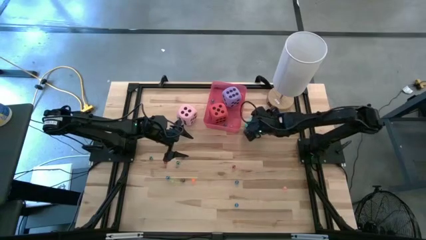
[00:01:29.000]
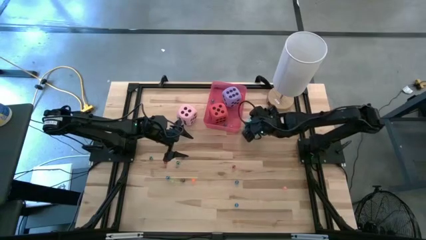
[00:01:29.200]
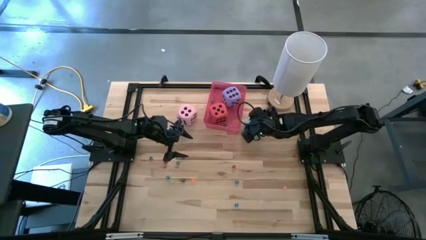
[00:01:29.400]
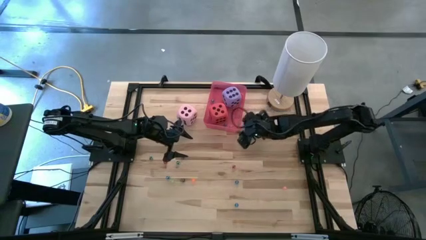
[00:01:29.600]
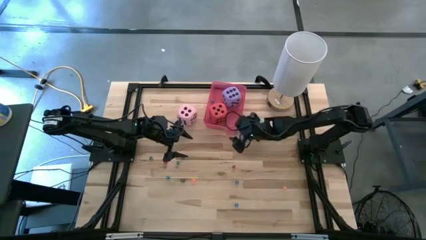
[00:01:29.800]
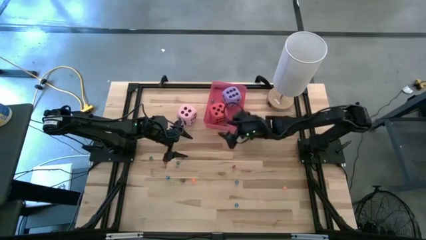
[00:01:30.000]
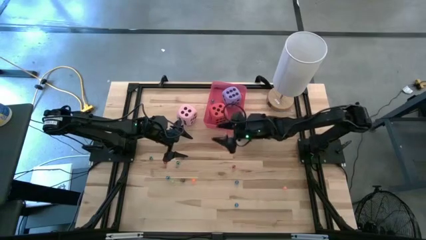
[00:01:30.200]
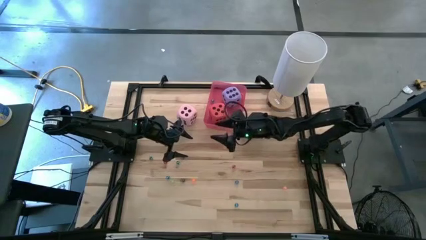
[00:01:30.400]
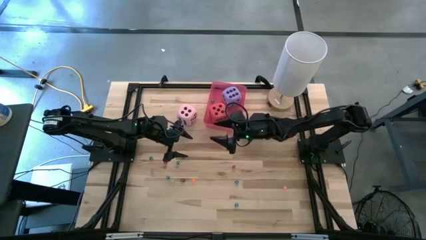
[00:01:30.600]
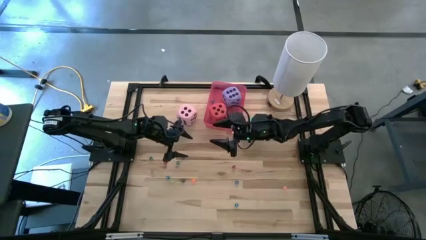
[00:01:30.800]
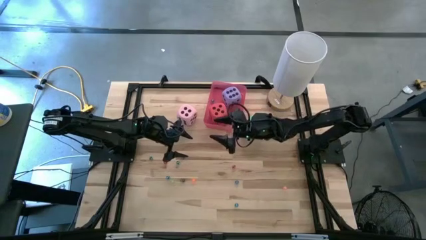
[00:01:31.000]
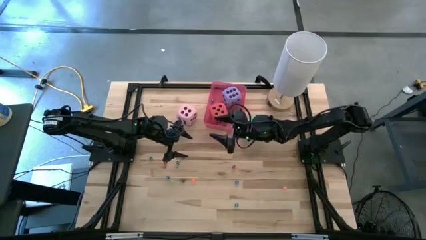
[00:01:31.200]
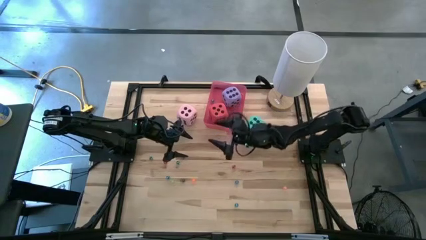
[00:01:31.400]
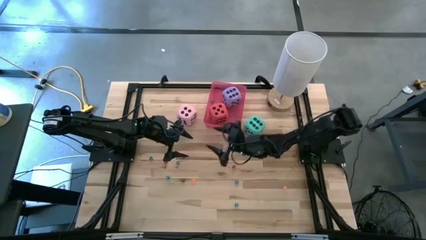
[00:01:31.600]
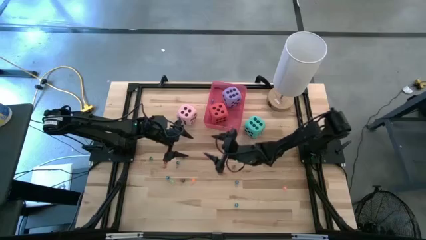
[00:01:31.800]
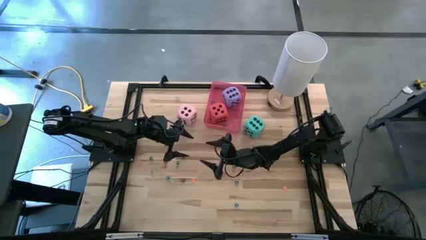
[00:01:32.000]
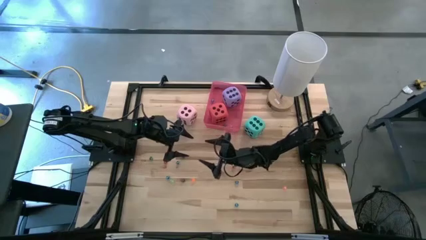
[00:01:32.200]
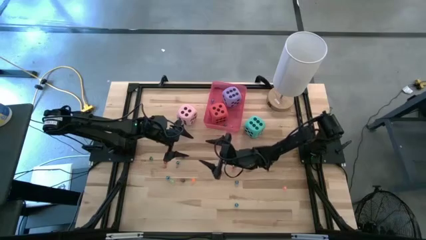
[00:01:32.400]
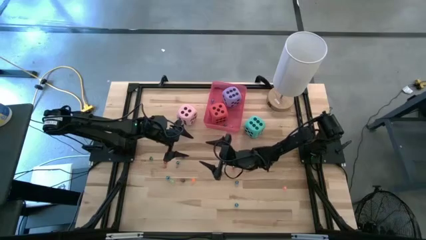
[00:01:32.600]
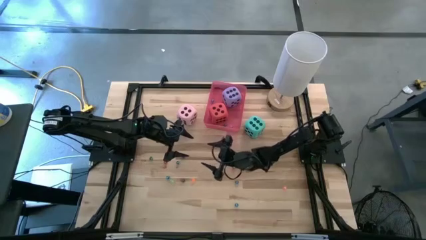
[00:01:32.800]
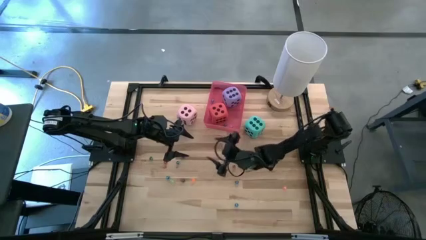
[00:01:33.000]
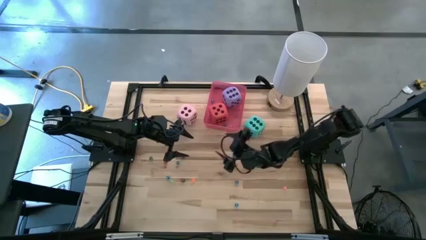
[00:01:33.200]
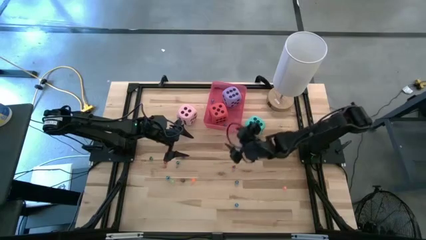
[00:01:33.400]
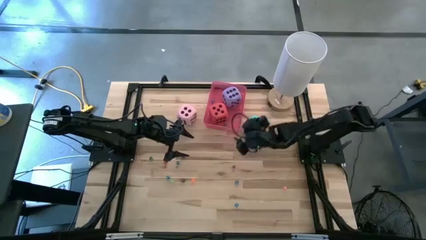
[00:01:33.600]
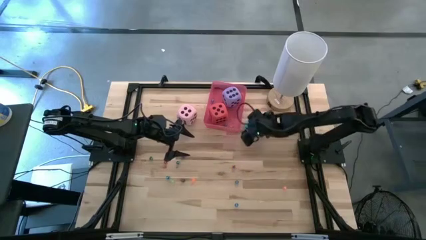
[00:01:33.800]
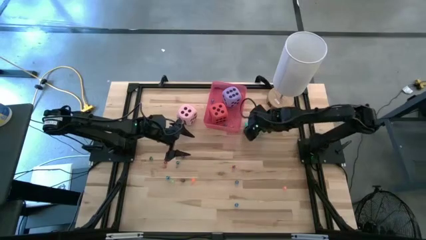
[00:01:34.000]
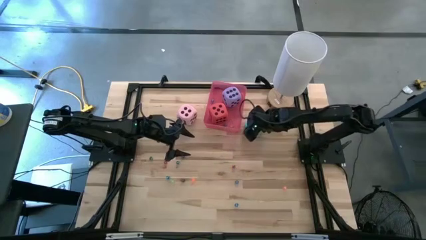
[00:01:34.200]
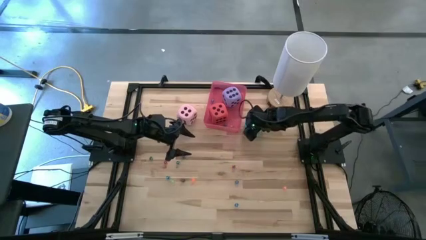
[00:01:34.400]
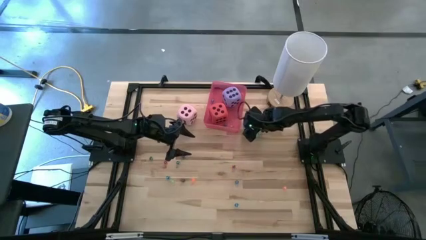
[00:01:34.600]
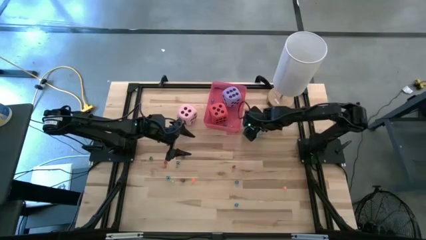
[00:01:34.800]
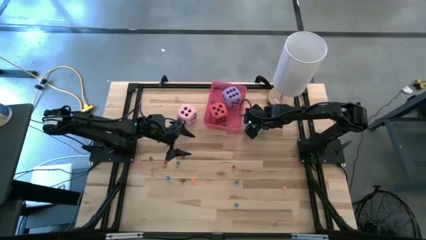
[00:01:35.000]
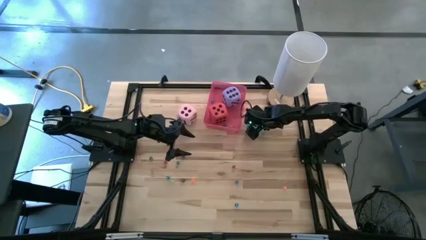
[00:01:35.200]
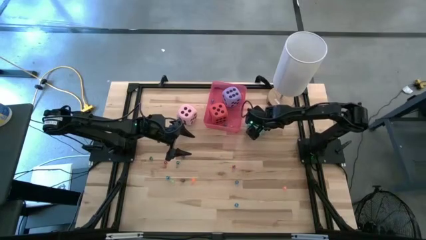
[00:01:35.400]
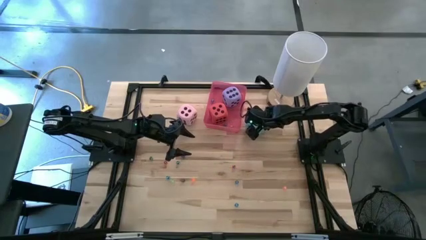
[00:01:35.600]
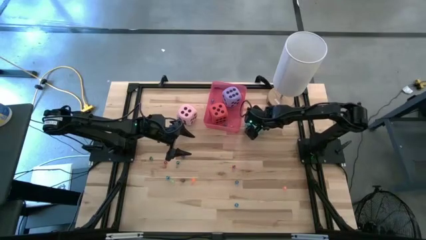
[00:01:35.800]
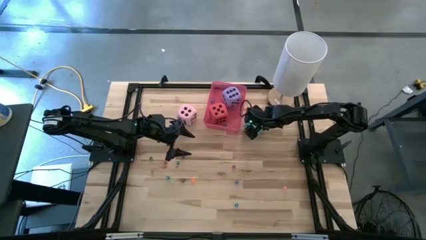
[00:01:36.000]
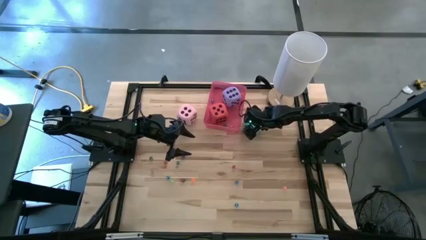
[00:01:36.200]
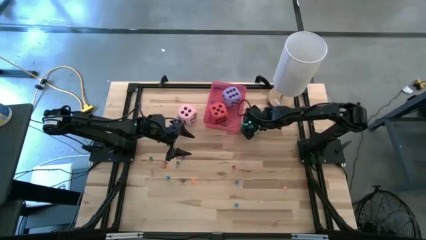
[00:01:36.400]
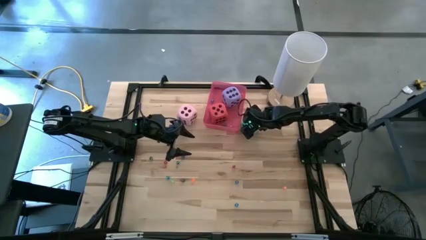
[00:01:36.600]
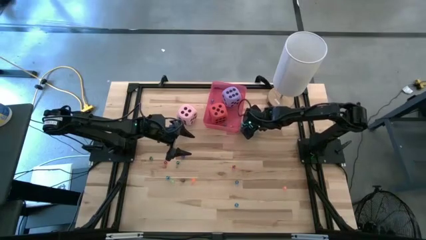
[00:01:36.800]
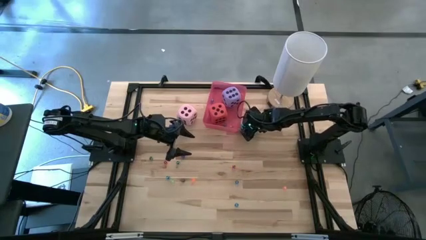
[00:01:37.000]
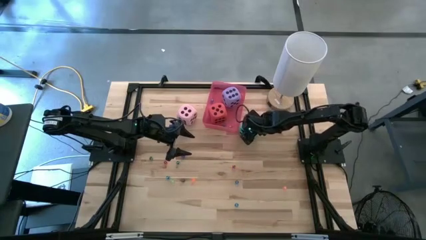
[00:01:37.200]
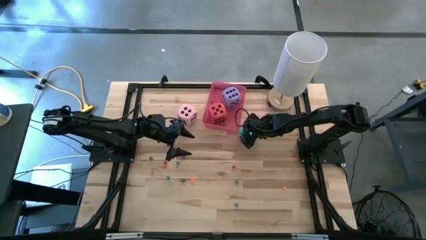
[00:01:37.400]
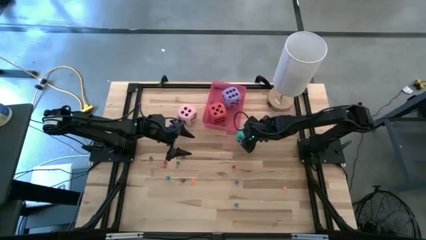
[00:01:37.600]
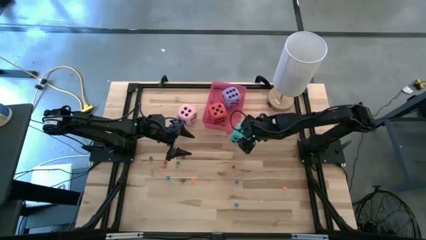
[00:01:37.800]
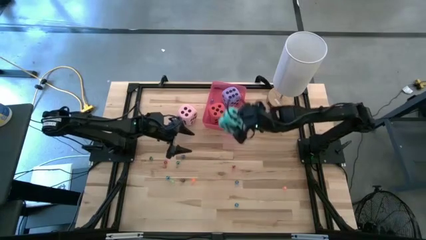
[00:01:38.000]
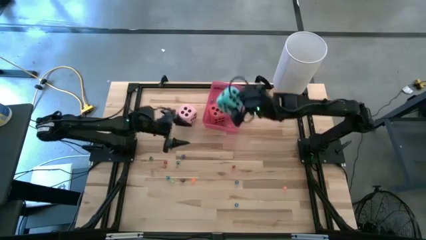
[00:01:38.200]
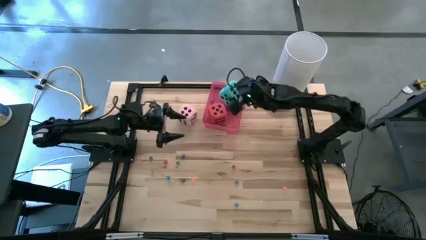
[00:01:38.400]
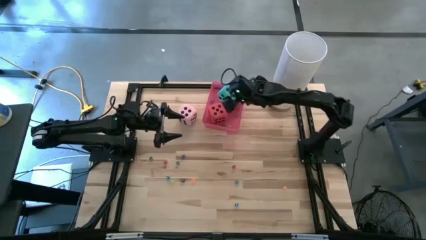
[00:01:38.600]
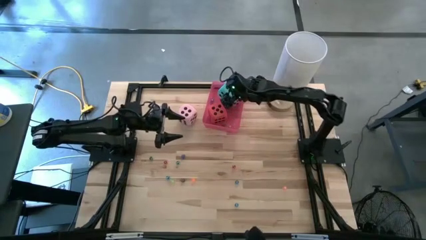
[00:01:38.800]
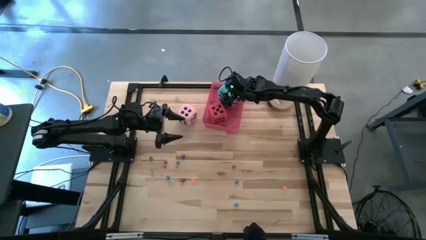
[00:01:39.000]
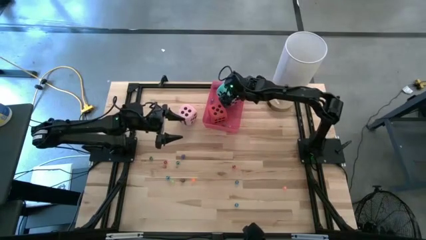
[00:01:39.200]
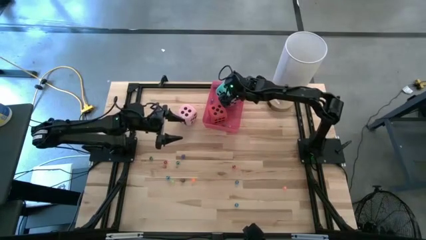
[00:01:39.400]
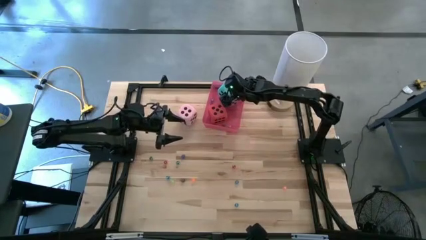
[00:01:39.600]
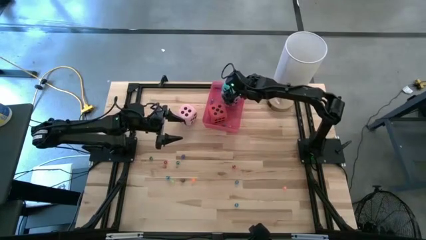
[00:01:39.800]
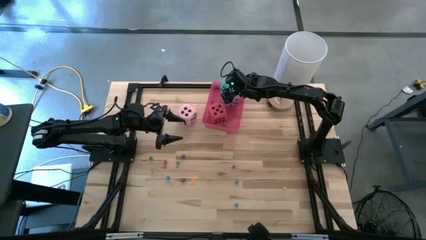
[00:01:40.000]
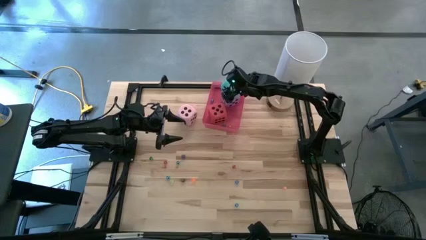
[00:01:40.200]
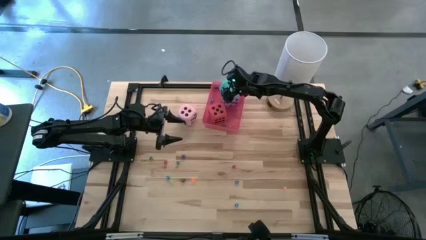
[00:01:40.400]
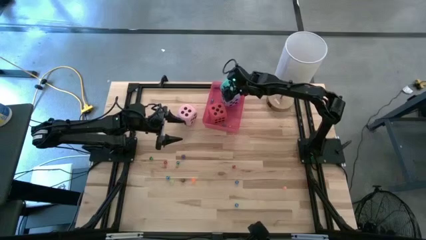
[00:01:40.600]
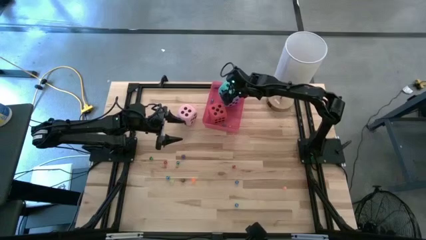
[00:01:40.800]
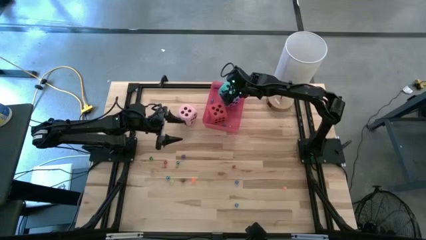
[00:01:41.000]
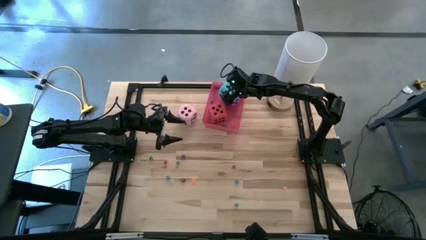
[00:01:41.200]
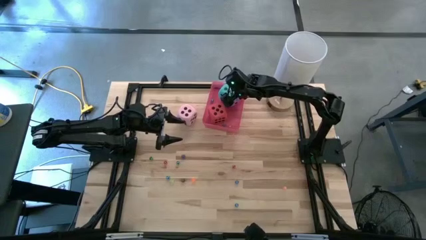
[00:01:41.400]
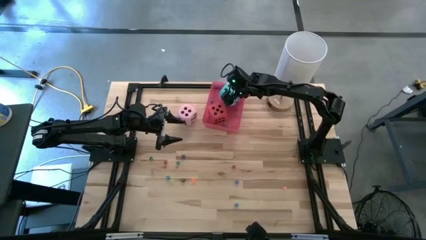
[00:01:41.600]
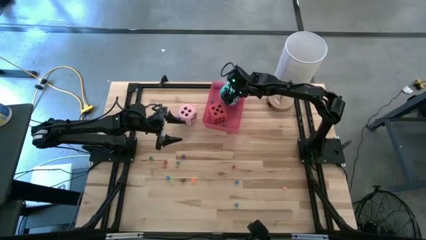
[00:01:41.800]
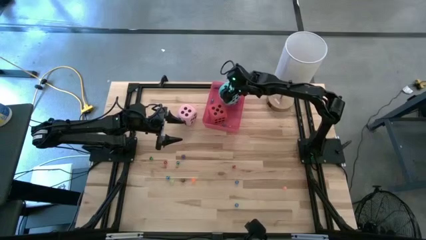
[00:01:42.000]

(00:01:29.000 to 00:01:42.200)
Task: Pick & Place Dice
Put the large blue dice into the bin

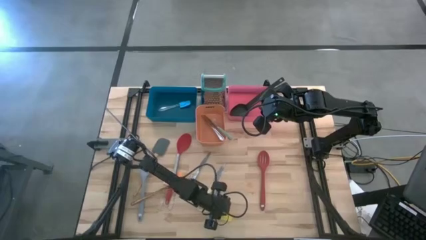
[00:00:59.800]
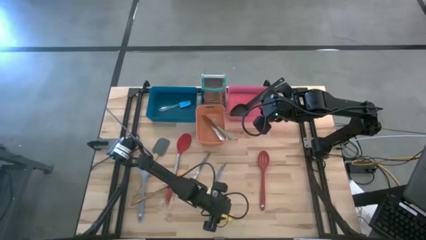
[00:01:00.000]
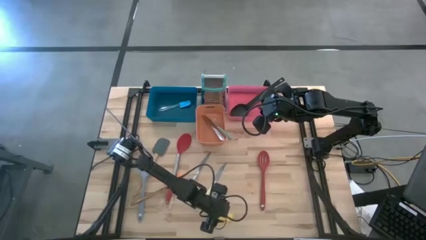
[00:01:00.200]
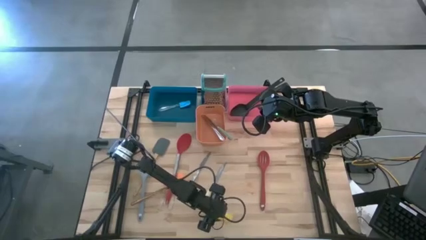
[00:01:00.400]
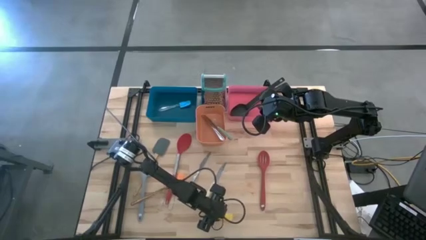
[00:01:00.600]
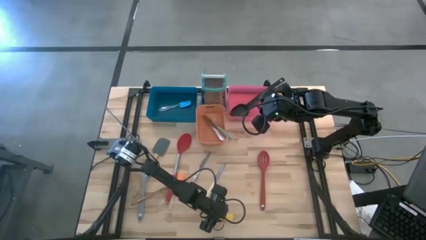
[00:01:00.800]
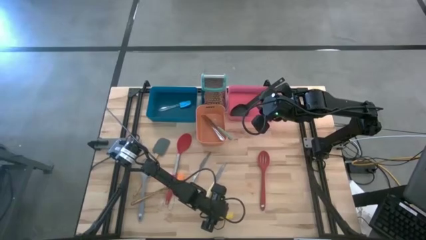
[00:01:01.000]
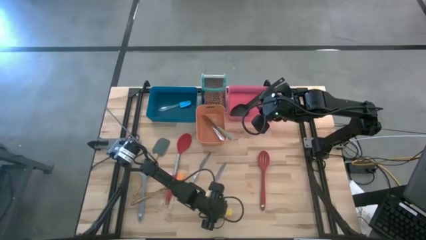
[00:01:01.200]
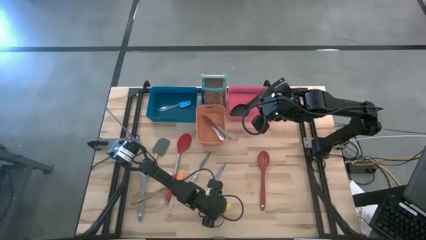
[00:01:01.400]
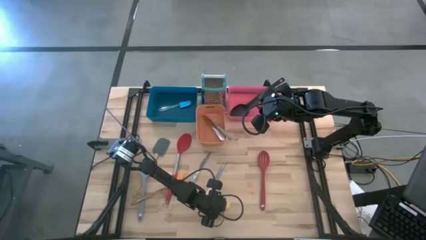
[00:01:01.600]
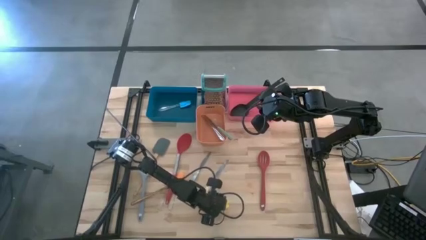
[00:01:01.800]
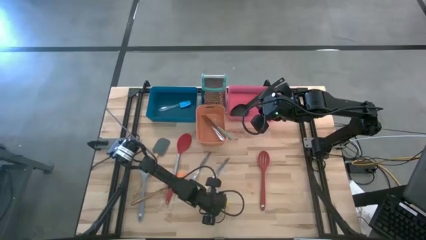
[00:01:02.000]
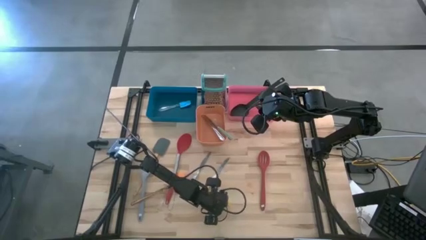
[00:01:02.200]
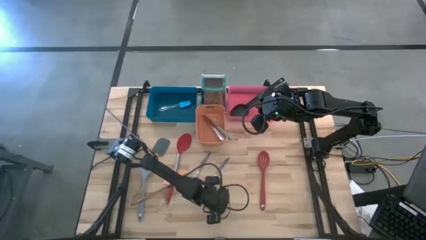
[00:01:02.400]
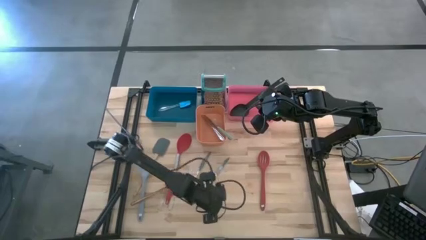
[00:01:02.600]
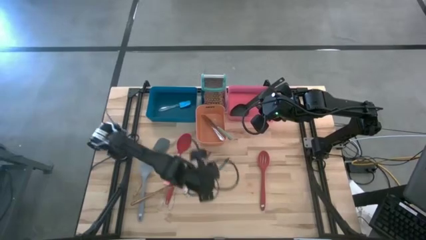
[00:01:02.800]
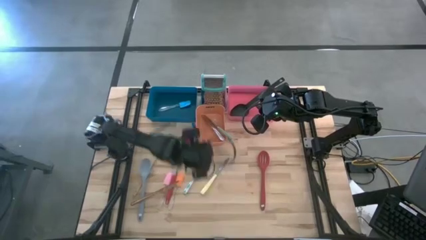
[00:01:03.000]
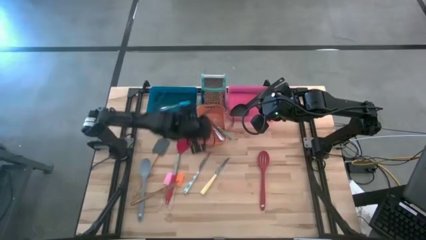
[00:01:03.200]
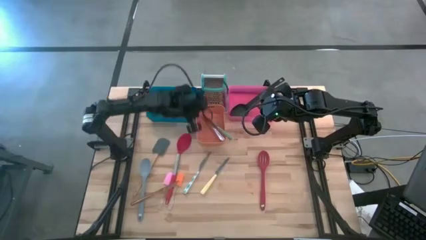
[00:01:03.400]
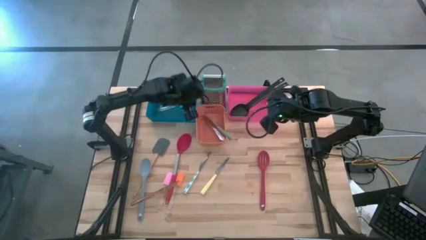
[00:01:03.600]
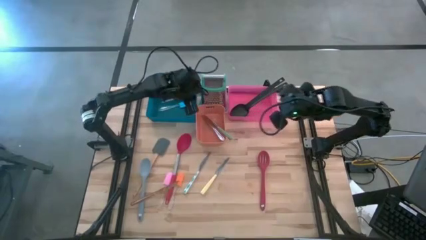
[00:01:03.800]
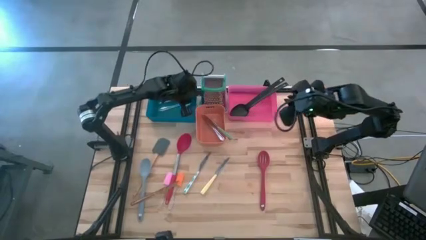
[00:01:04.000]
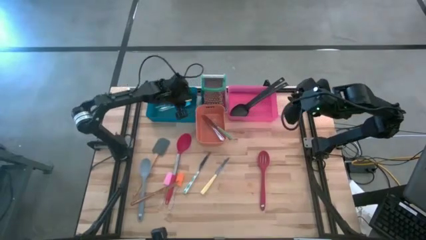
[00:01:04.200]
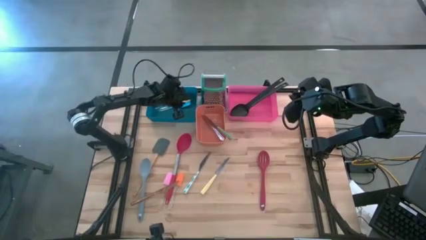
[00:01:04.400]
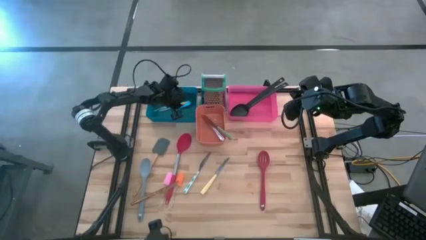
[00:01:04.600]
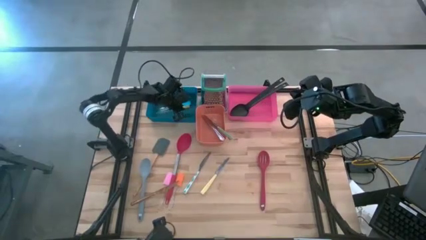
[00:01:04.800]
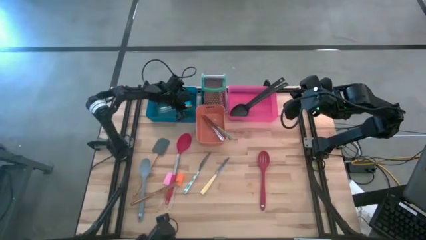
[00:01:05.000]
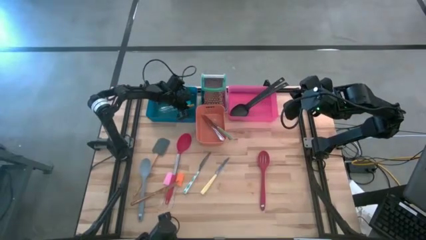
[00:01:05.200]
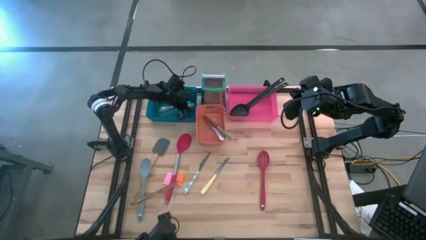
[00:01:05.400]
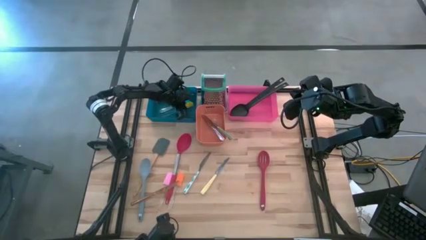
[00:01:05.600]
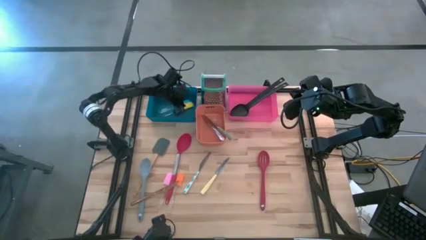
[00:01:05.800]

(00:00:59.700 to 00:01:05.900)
Task: Pick & Place Kitchen Items
Put the yellow spatula into the blue bin
